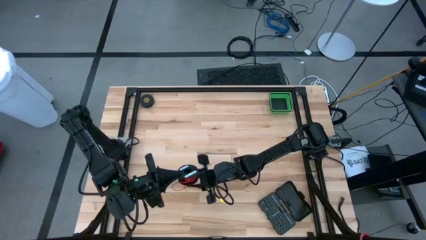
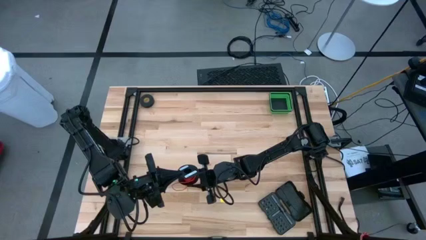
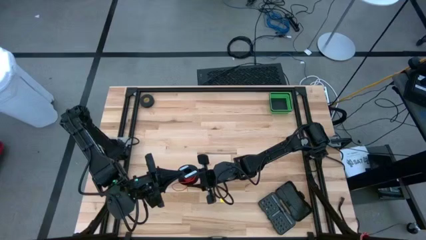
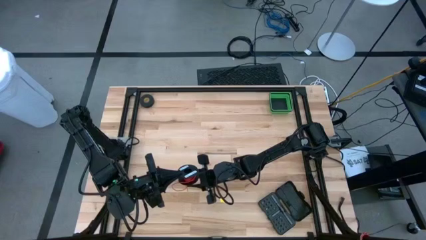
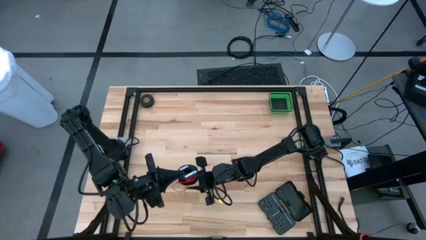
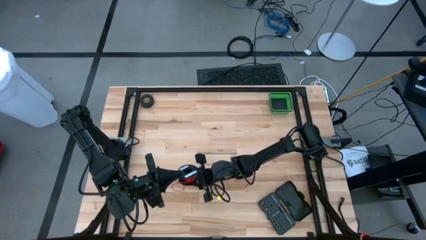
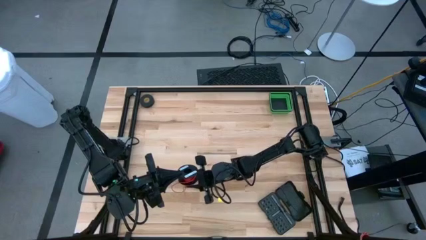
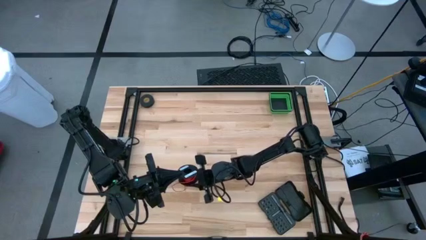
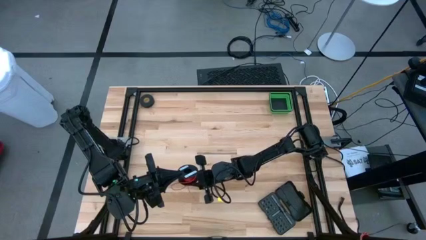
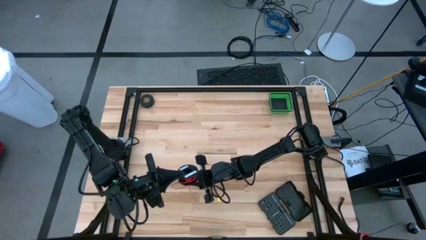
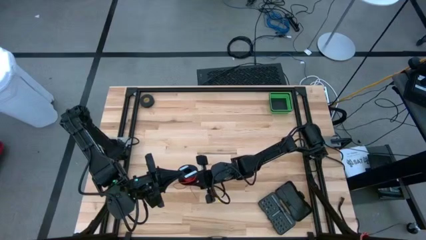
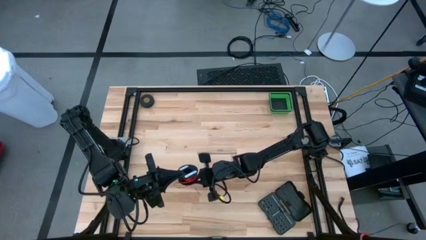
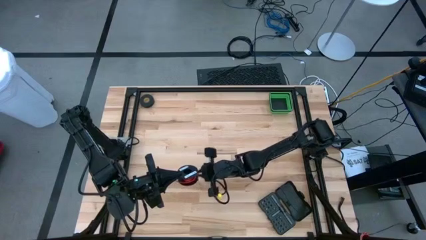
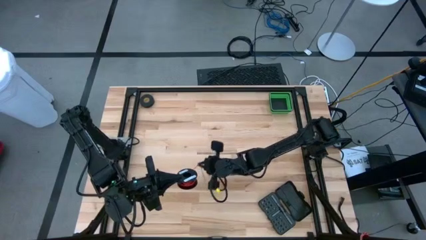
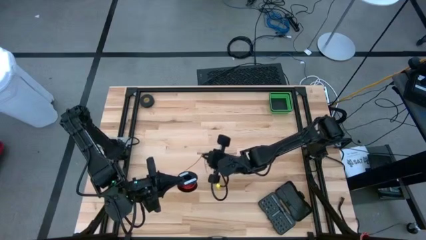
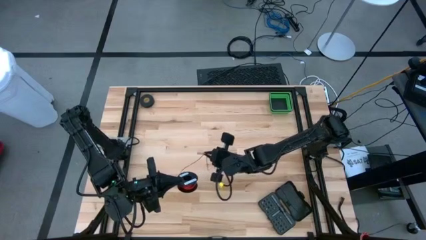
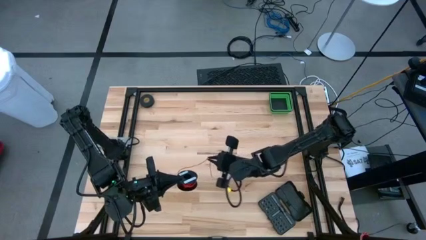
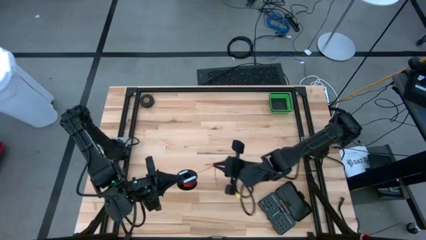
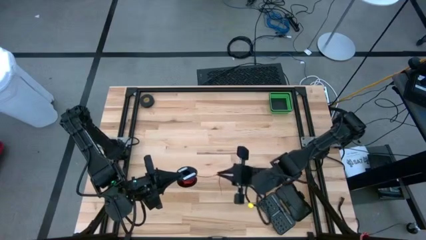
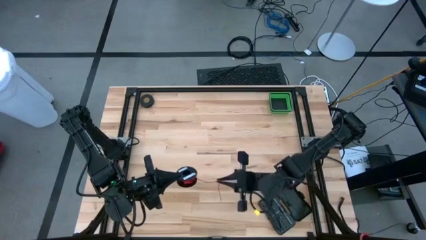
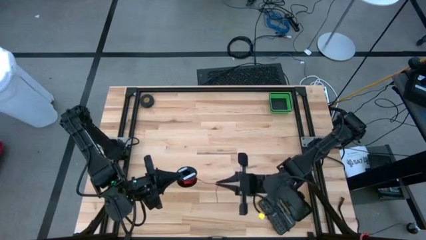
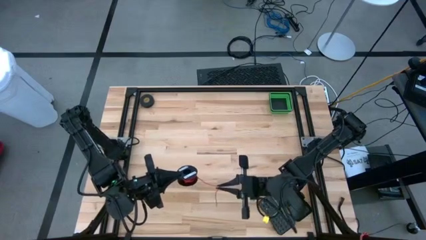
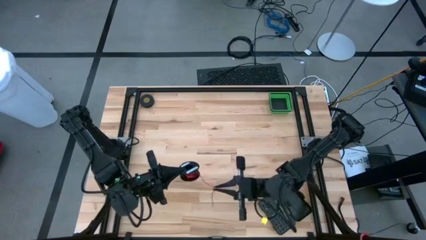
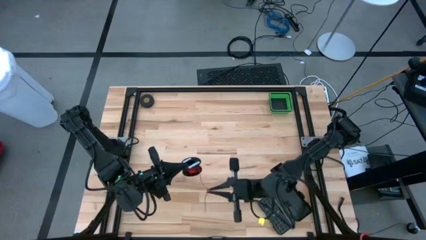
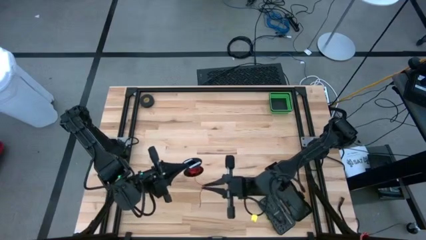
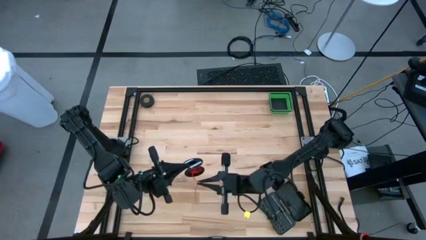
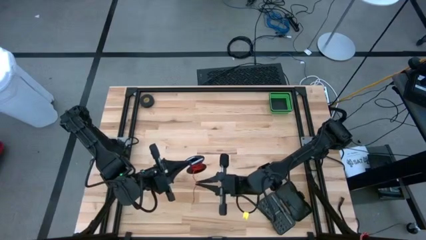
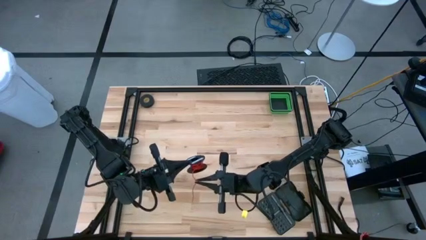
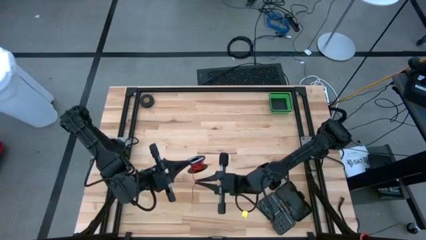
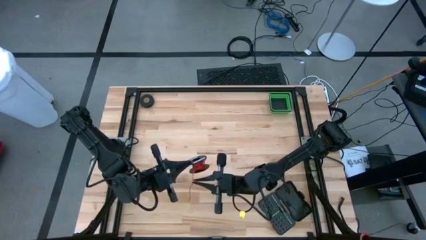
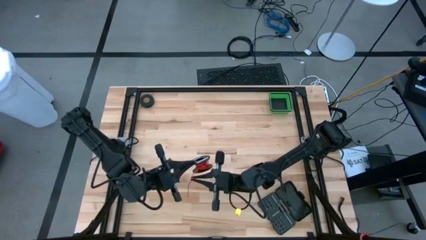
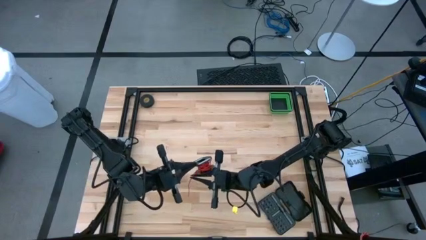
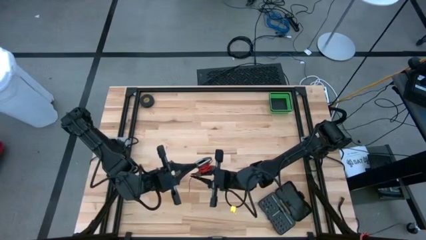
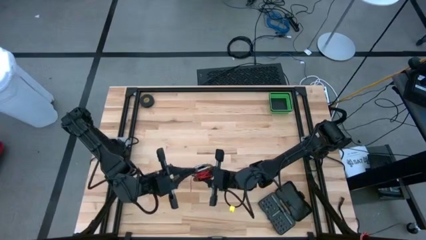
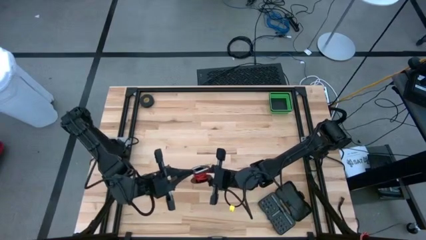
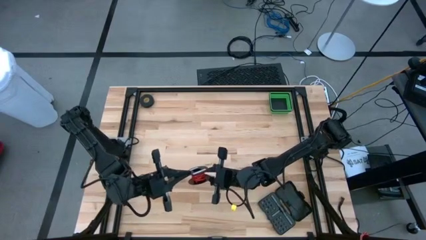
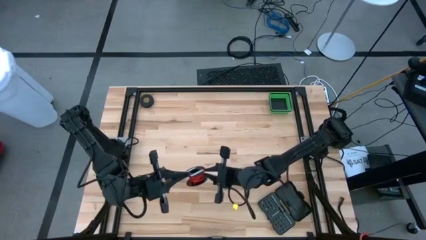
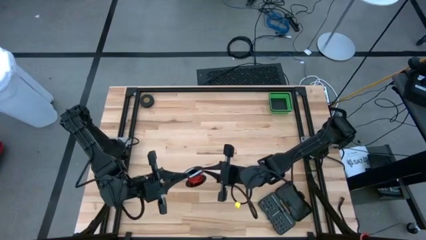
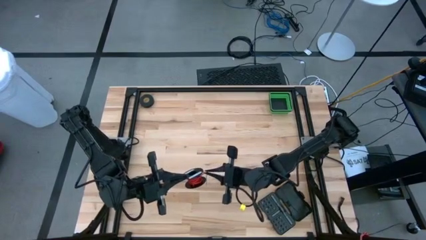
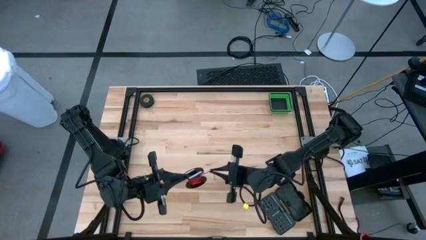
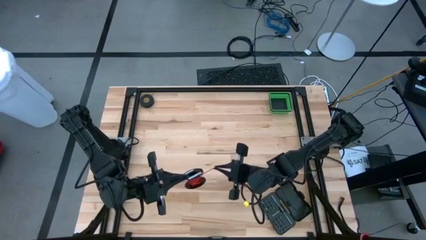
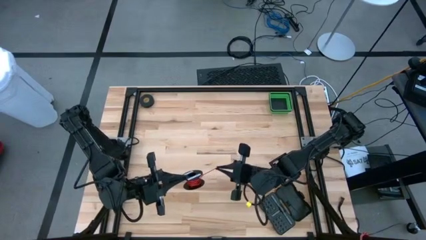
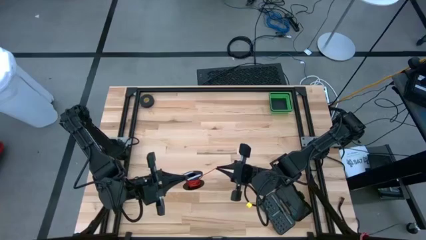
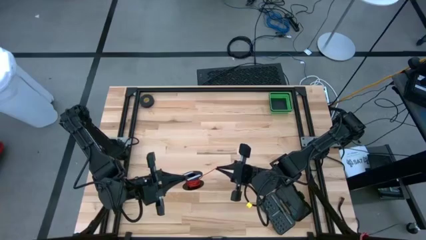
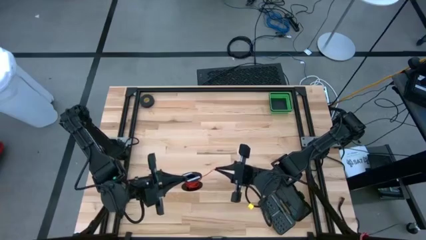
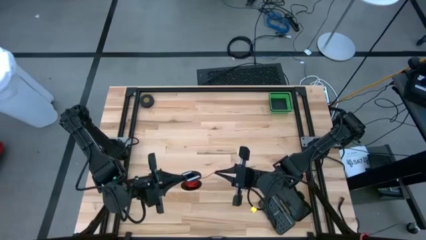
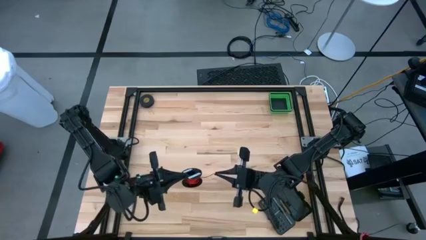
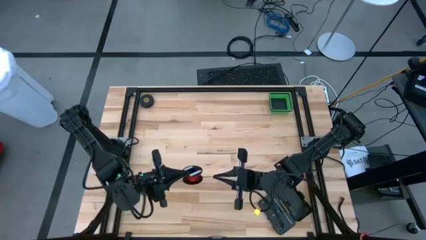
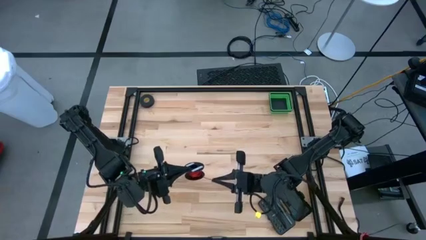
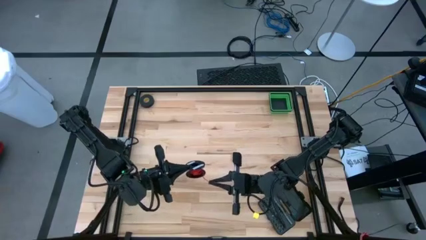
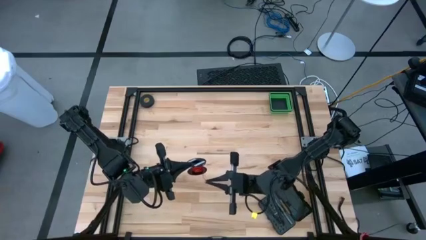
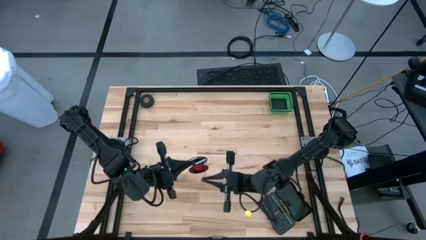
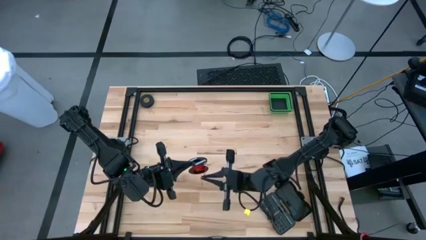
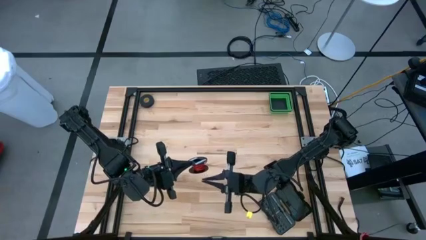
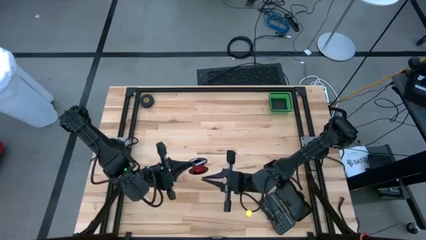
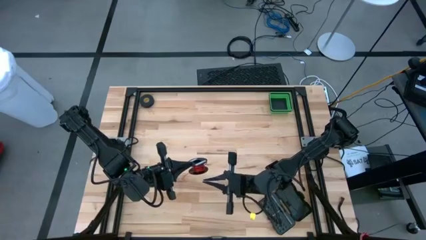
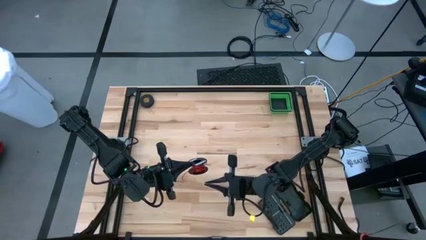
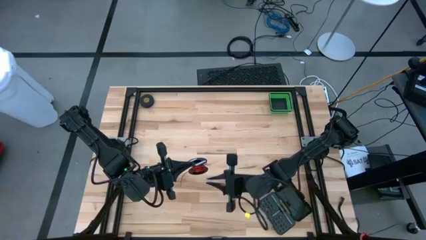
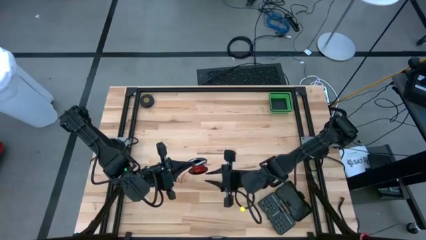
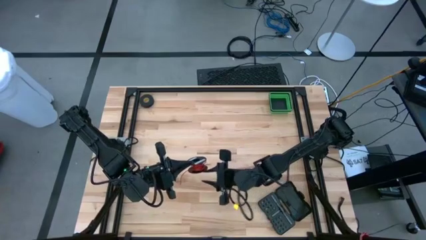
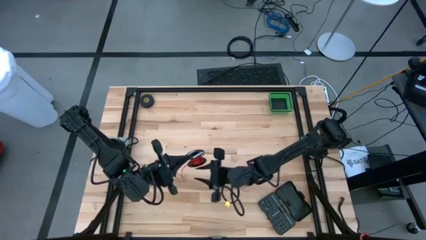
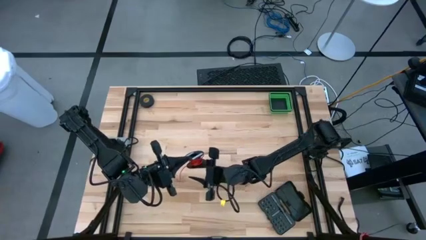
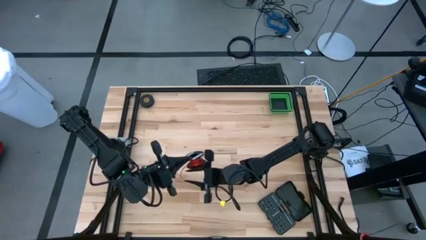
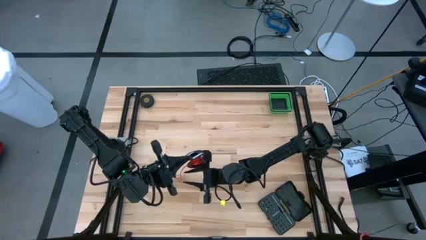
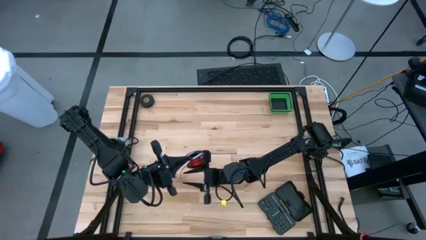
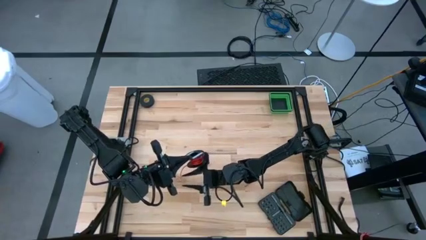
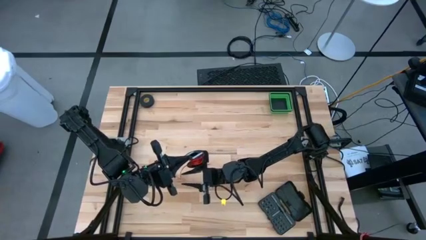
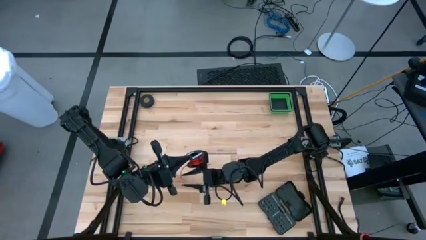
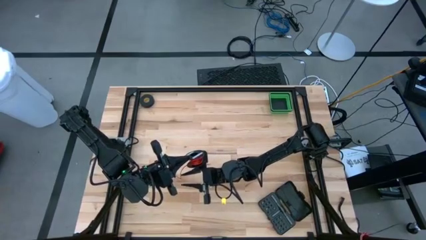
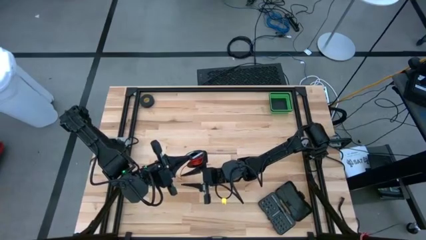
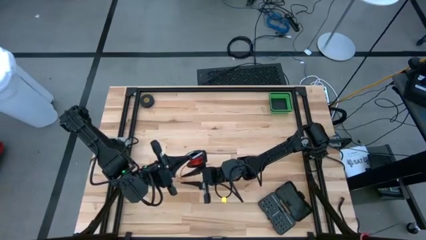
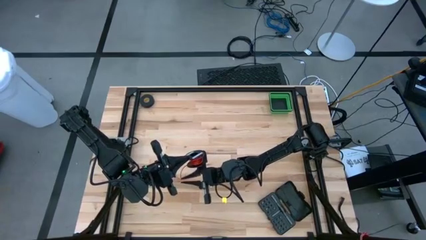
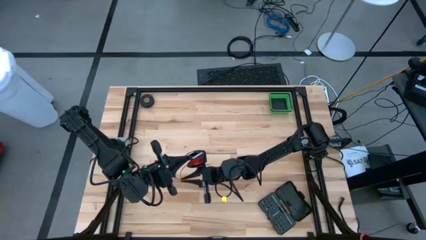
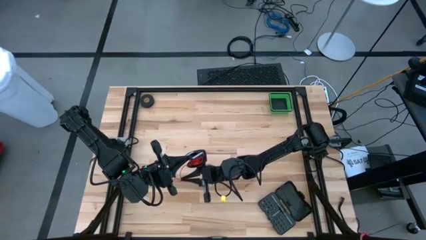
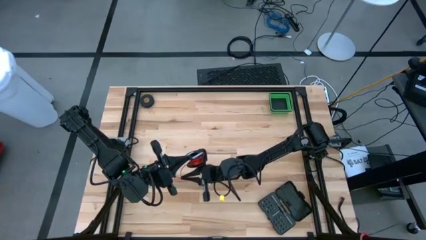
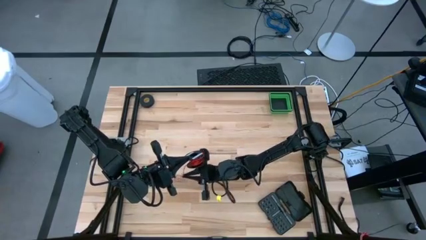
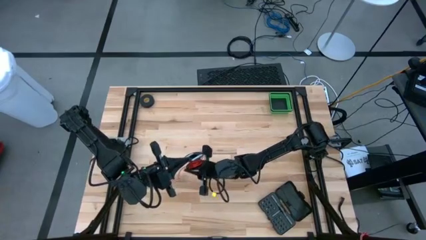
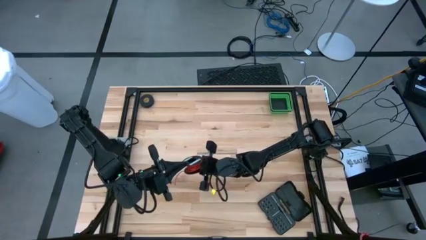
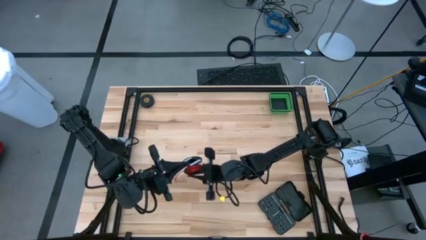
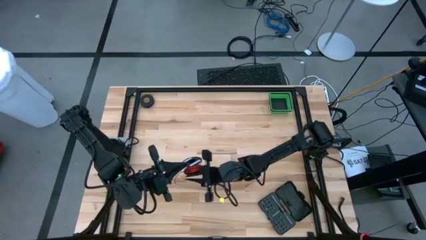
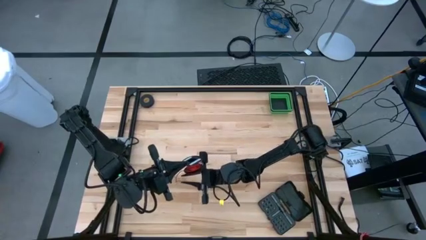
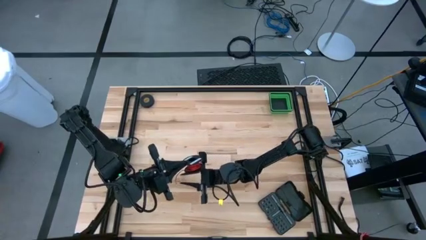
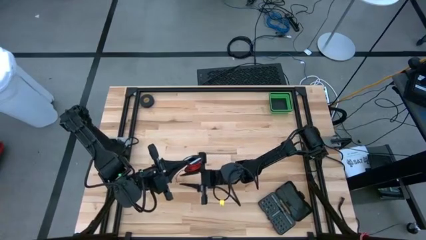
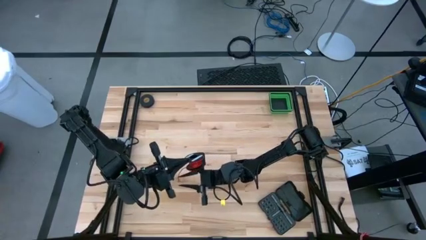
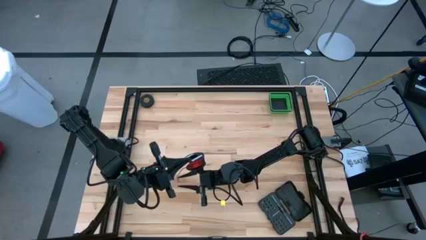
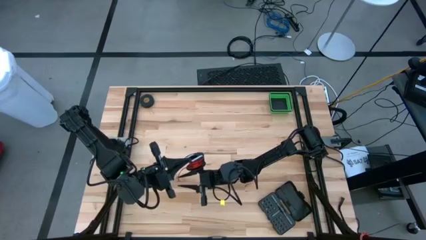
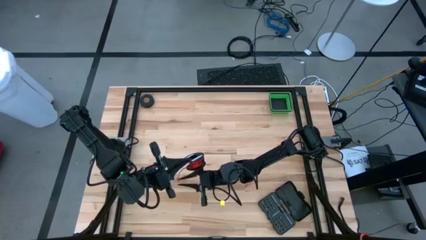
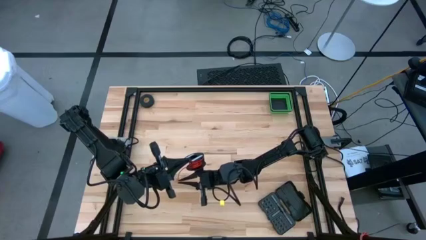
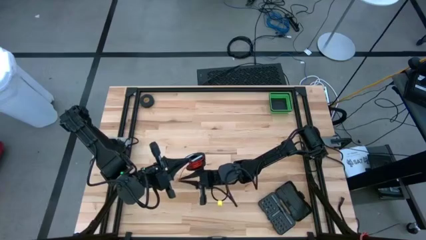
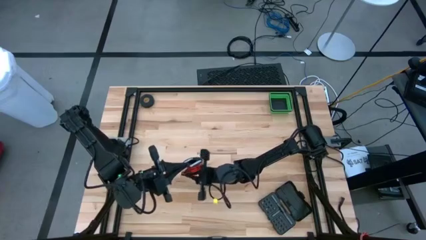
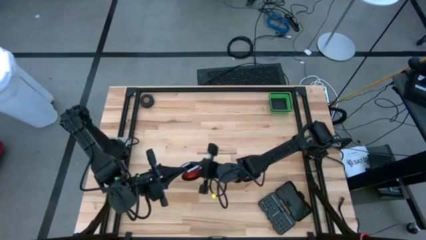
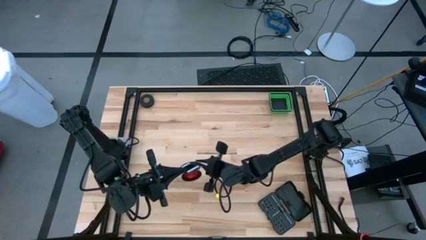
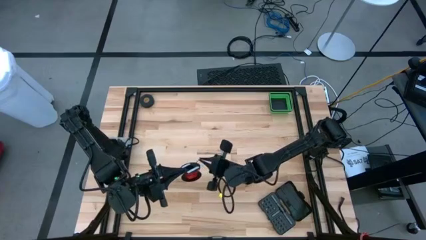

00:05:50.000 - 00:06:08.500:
Task: Coil cords
Coil the red wire on the black spool
